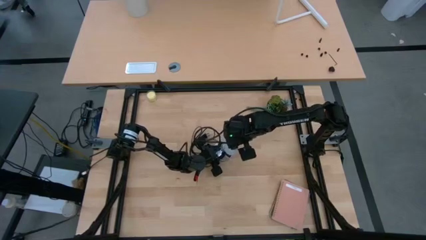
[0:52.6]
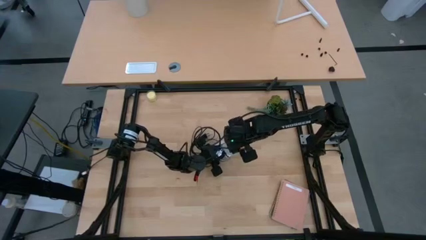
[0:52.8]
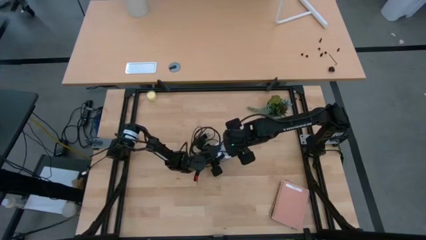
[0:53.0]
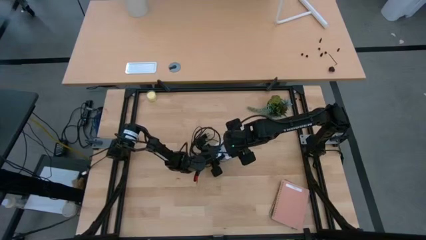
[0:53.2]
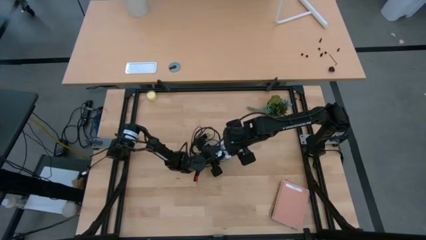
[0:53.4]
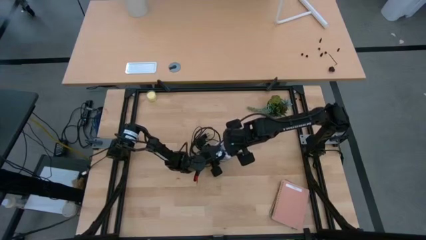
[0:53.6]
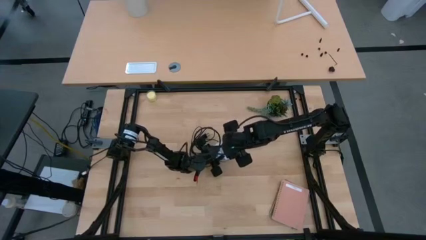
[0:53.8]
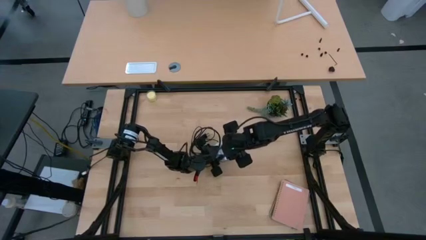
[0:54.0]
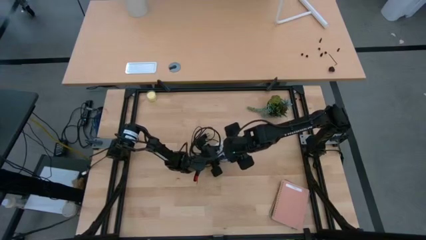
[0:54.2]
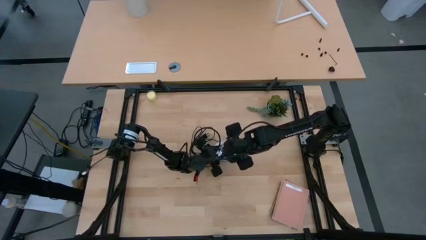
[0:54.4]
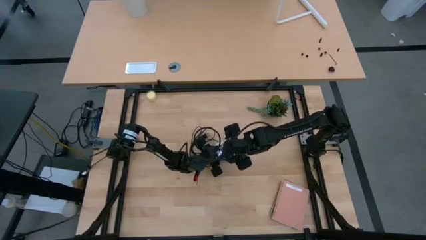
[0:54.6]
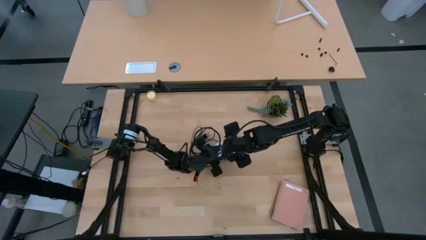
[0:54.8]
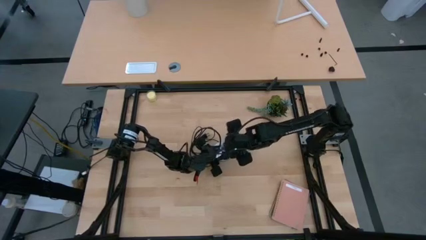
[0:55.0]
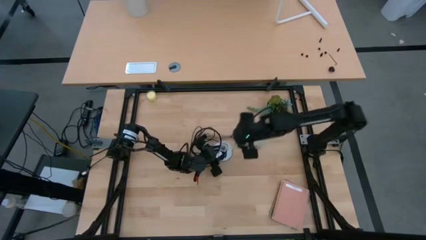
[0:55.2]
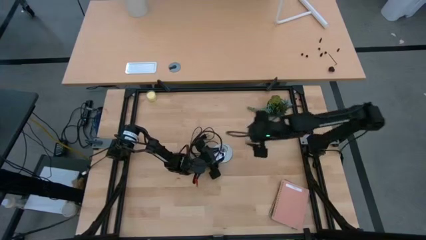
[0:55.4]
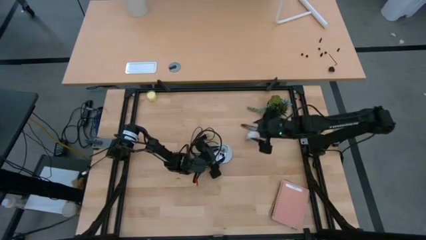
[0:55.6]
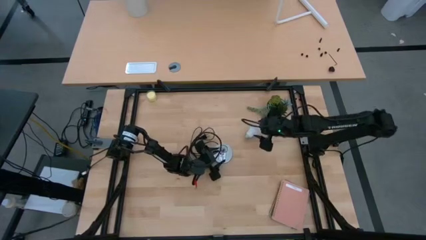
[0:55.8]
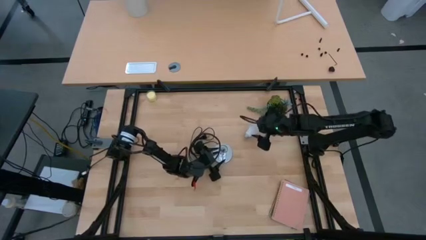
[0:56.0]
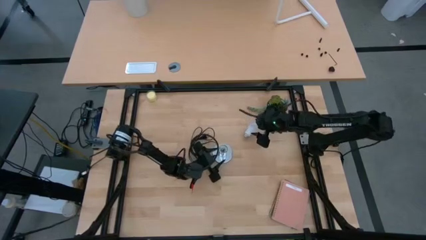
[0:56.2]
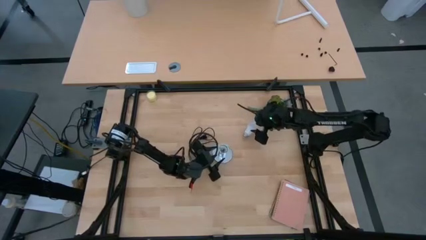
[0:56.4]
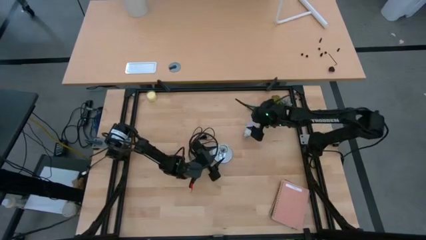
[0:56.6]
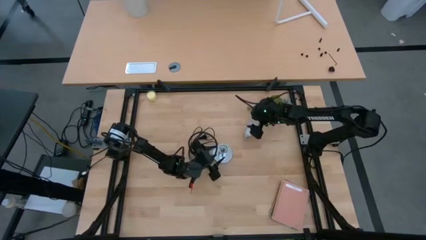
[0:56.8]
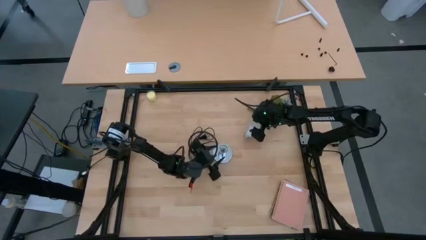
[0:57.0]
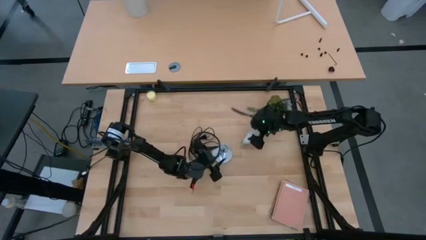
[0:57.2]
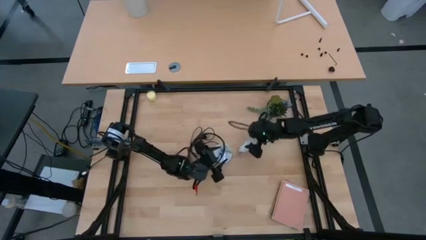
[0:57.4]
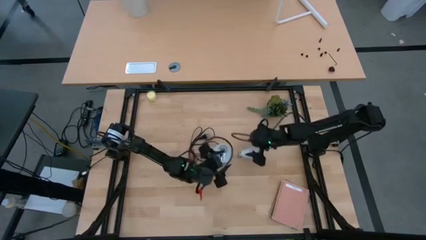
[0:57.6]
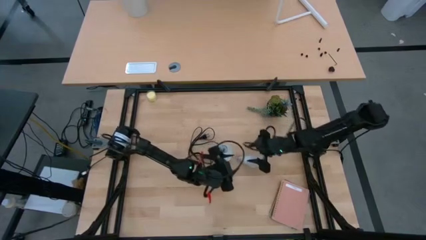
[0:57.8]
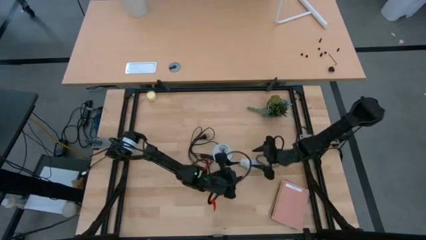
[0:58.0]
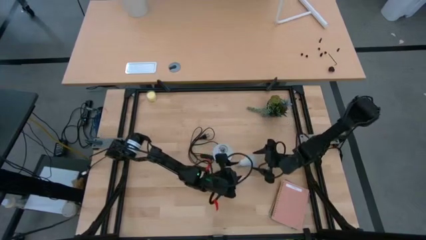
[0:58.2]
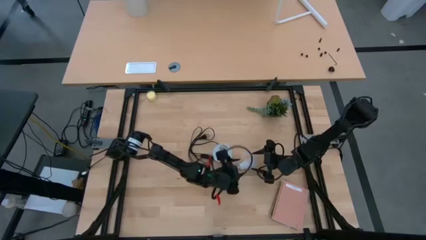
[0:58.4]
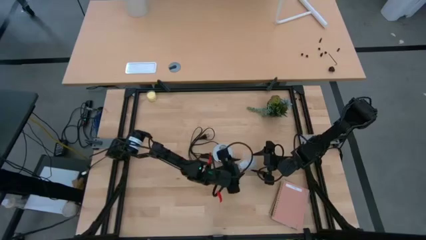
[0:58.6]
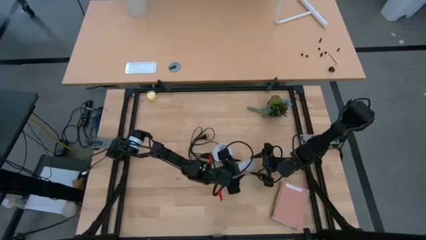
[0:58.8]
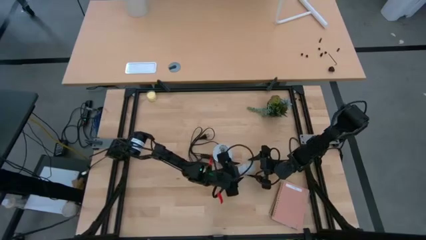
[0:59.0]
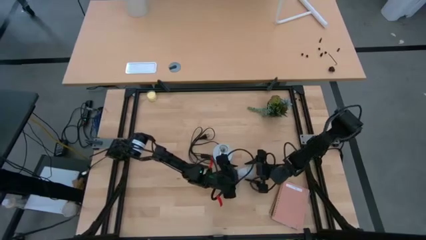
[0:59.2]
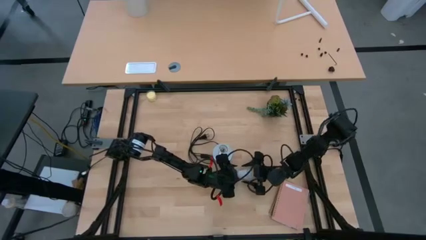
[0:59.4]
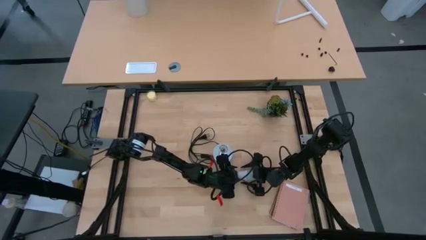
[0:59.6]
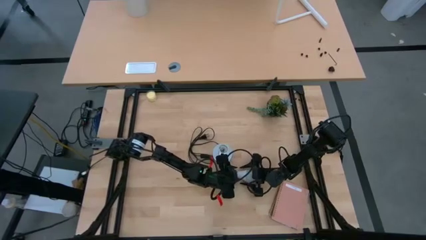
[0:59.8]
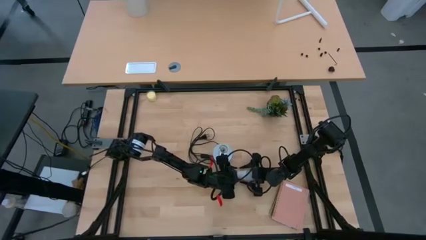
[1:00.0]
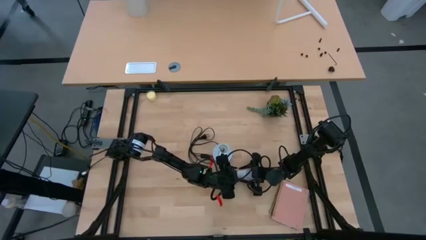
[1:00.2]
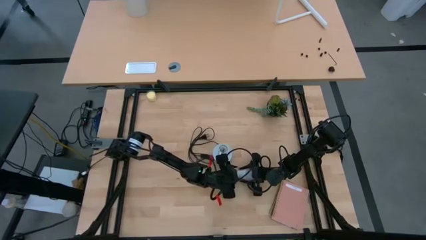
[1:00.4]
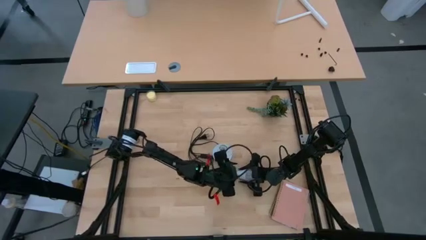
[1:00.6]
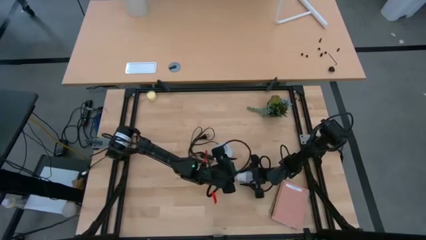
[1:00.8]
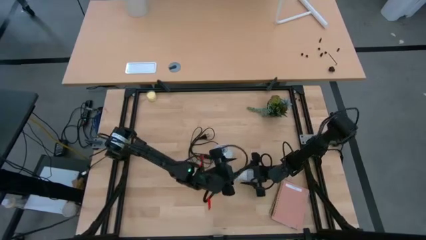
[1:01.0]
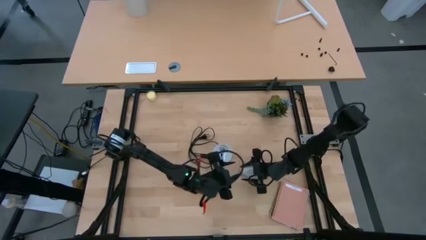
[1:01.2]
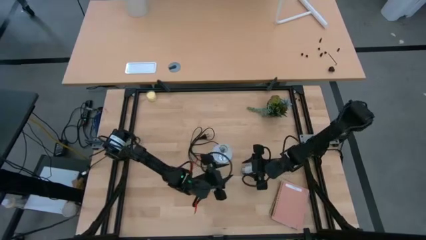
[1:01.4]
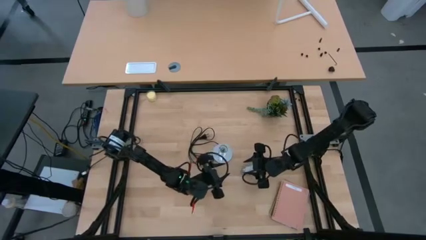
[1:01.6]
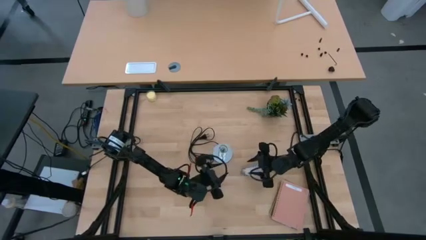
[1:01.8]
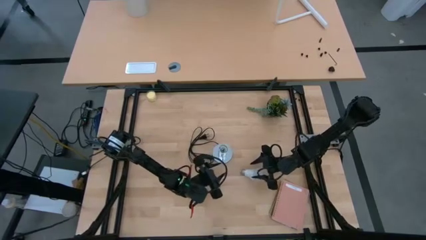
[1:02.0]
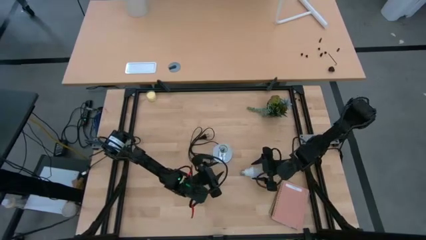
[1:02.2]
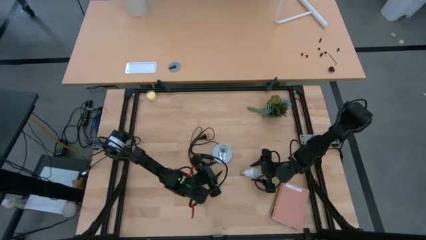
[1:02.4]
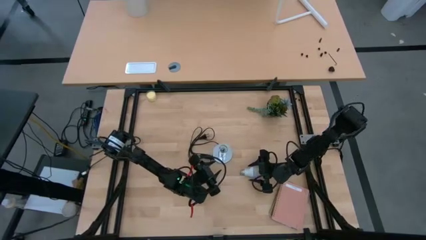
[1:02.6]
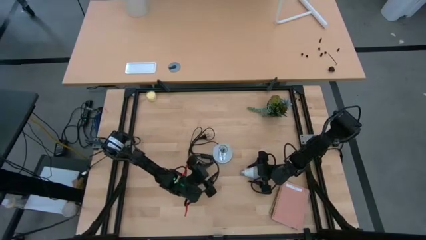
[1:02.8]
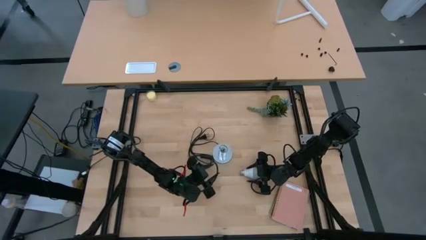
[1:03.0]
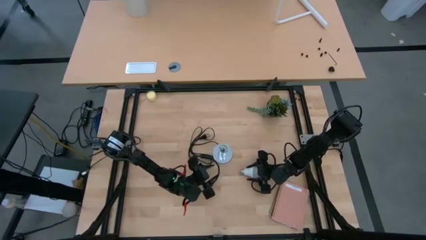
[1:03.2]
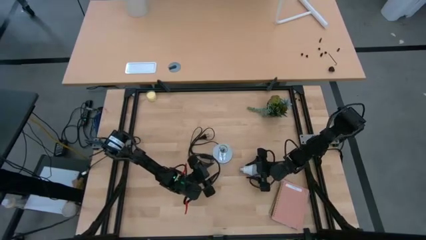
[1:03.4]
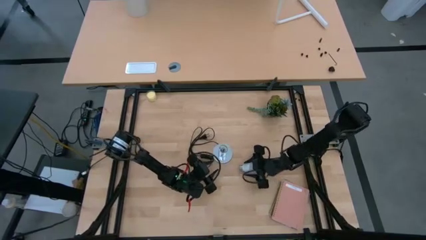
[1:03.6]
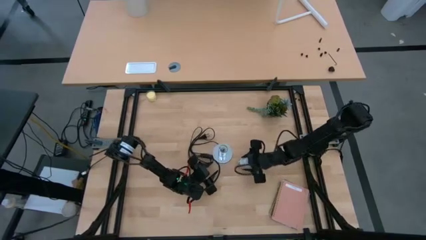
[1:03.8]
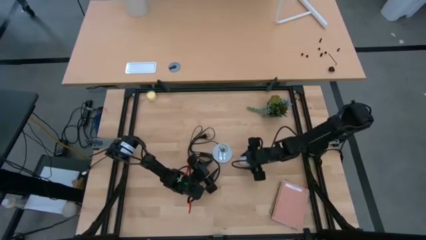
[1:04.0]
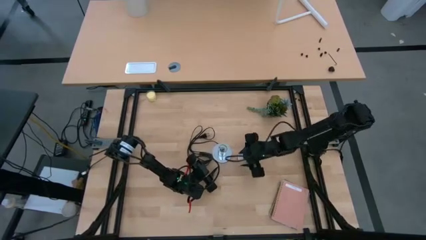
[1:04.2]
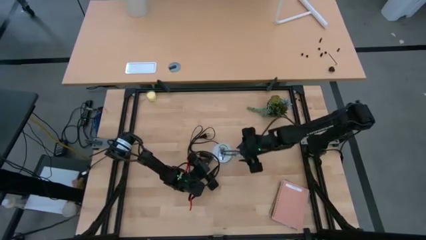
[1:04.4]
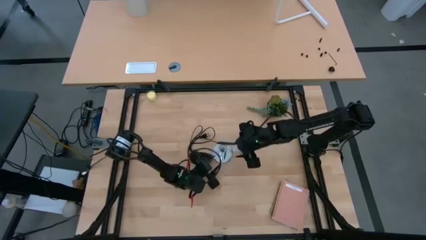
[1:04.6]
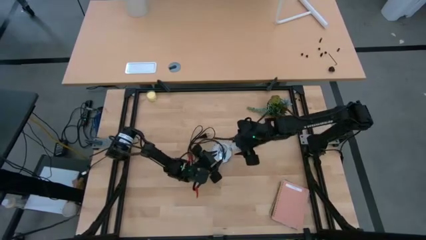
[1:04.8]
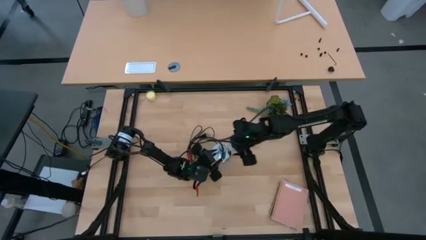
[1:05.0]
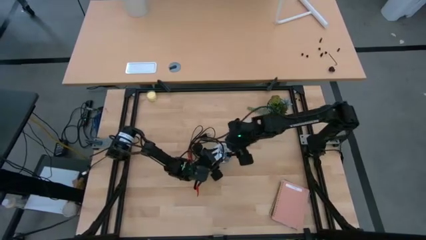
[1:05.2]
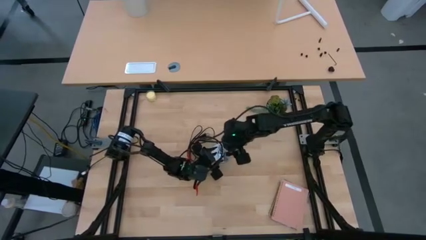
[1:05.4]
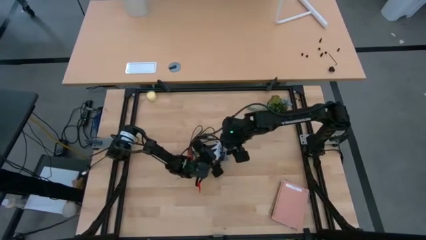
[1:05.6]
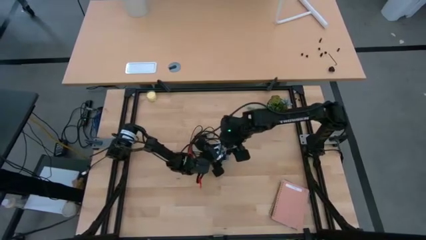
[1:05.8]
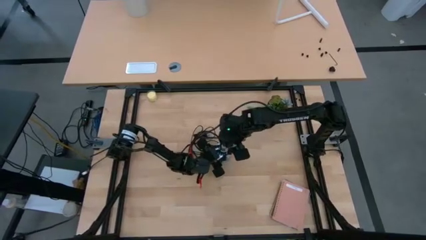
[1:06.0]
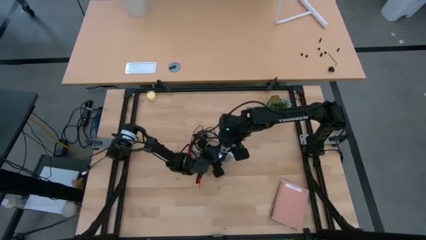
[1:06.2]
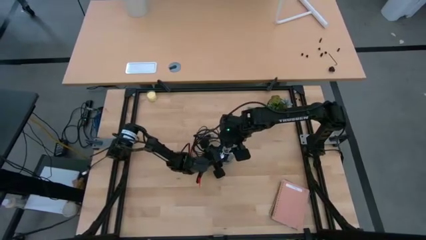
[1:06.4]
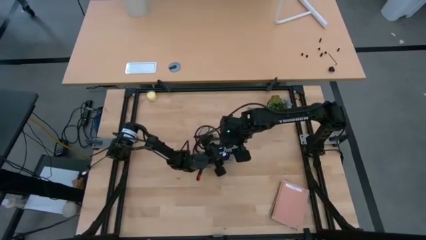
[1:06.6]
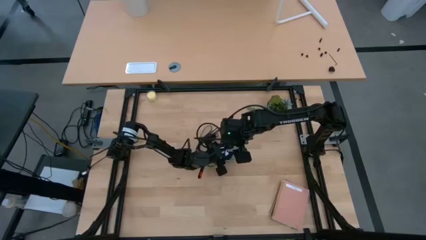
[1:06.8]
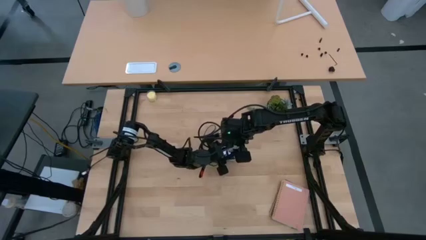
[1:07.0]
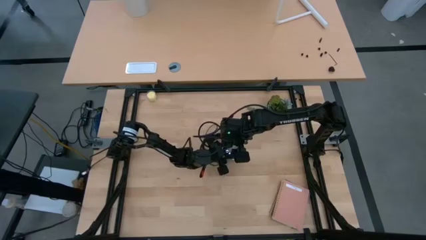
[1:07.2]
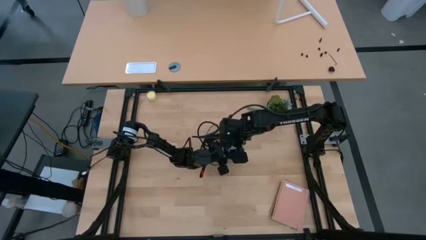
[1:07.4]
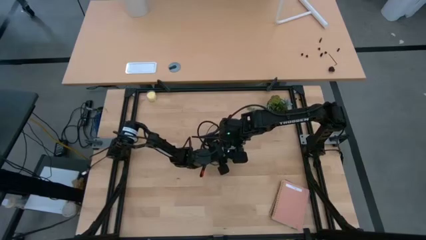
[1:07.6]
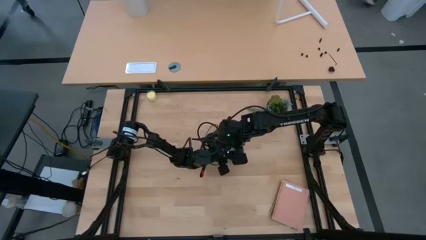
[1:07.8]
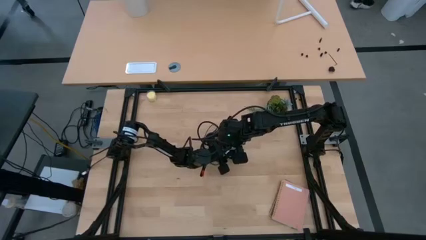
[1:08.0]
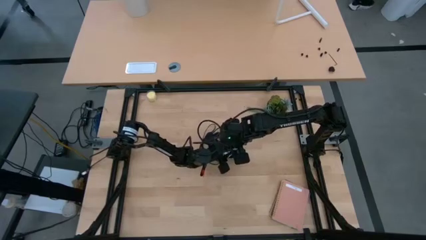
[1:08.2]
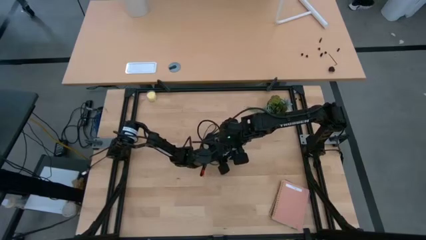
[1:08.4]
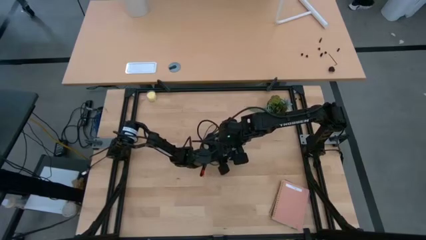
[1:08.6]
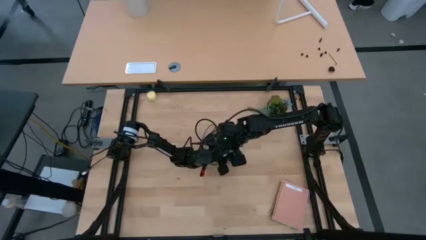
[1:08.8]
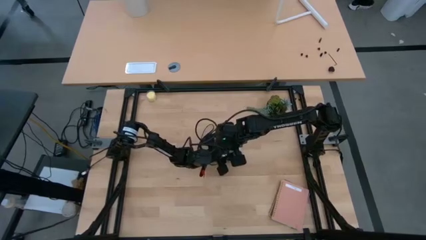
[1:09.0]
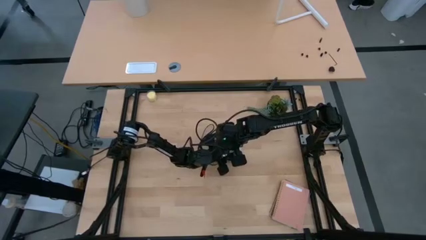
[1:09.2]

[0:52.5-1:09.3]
Task: Screw lightbulb
Insert the white lightbulb into the metallic lamp
